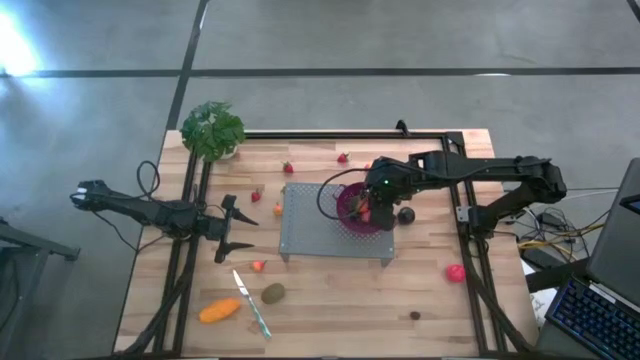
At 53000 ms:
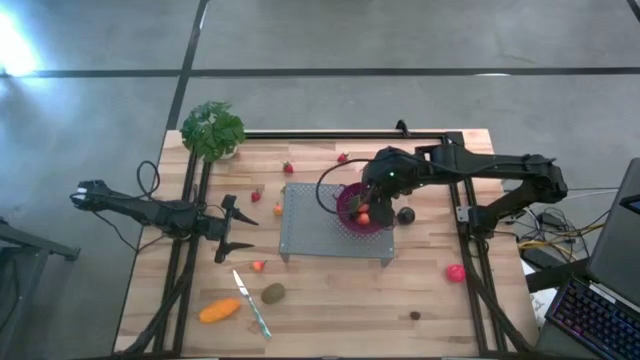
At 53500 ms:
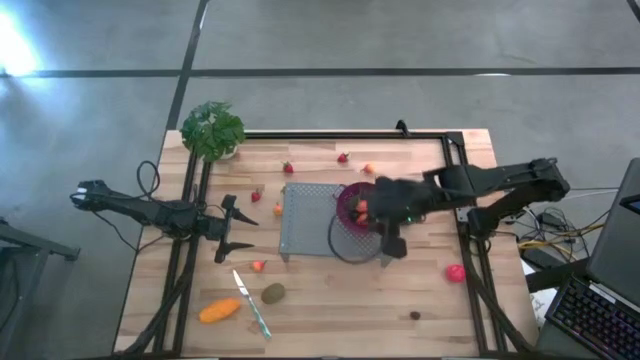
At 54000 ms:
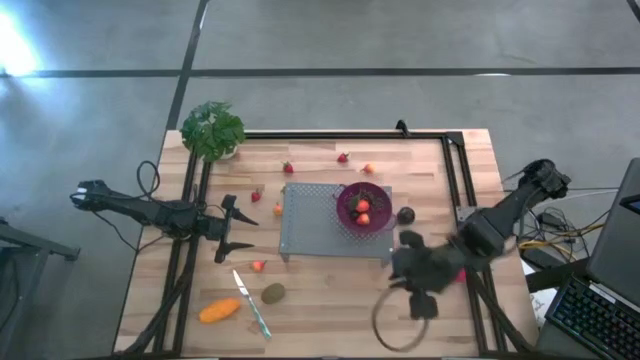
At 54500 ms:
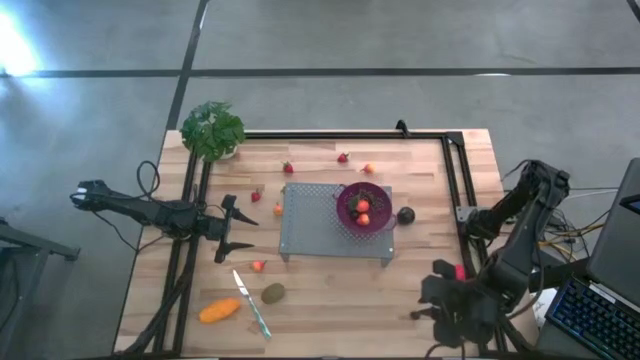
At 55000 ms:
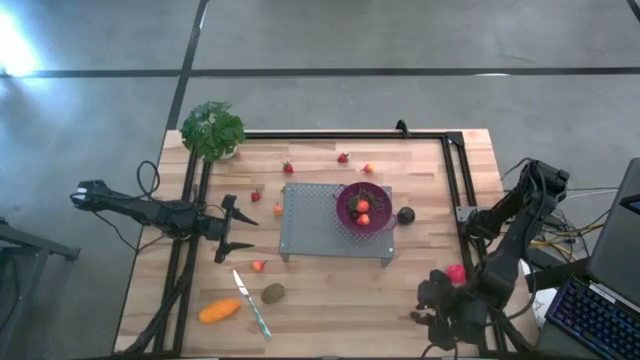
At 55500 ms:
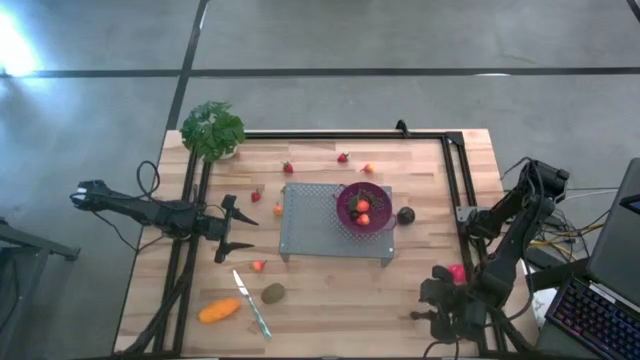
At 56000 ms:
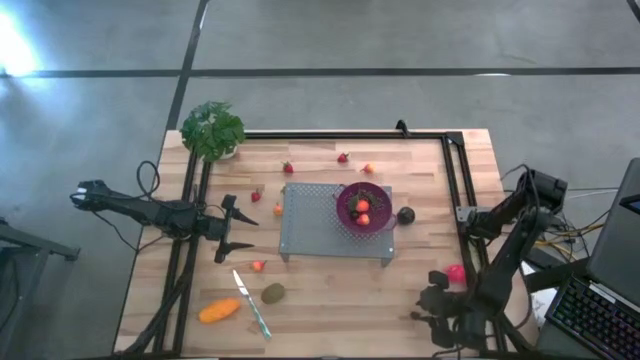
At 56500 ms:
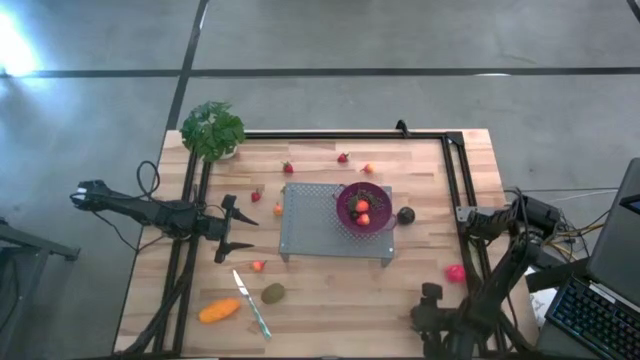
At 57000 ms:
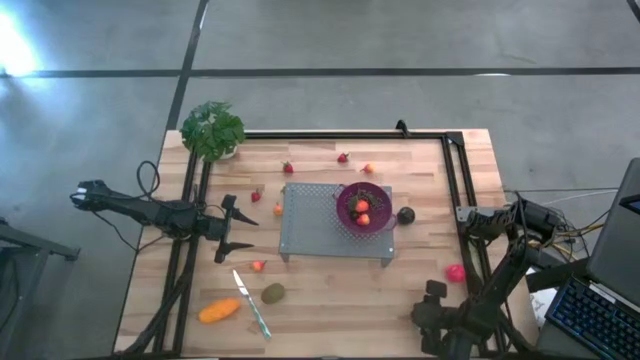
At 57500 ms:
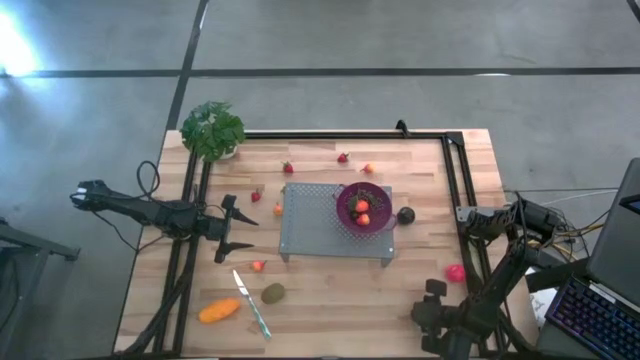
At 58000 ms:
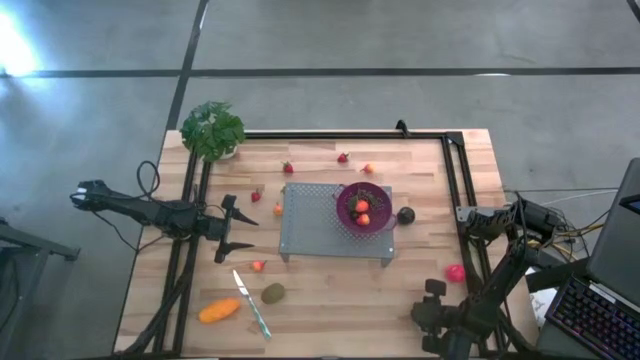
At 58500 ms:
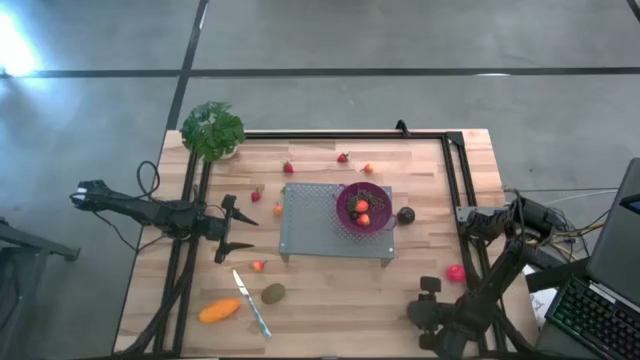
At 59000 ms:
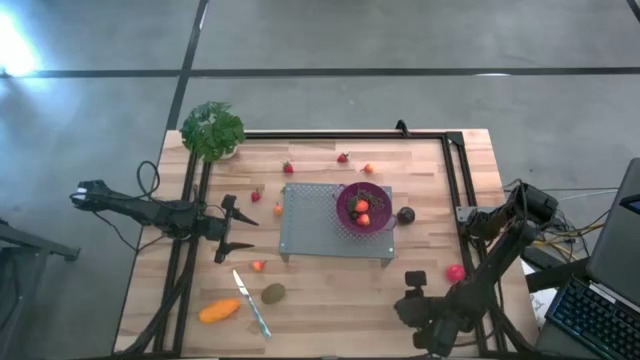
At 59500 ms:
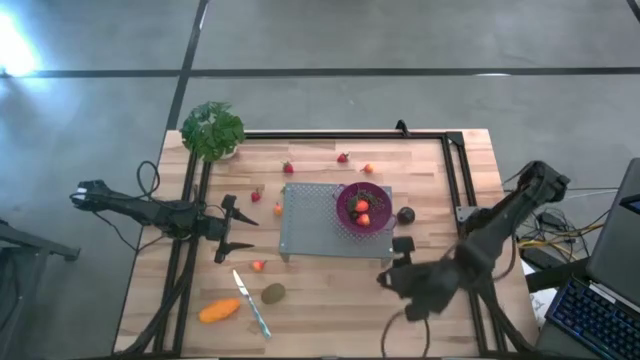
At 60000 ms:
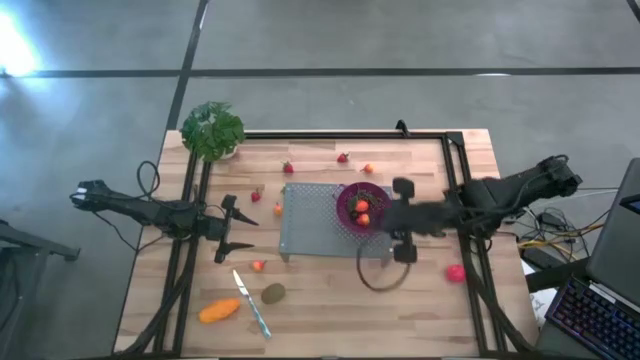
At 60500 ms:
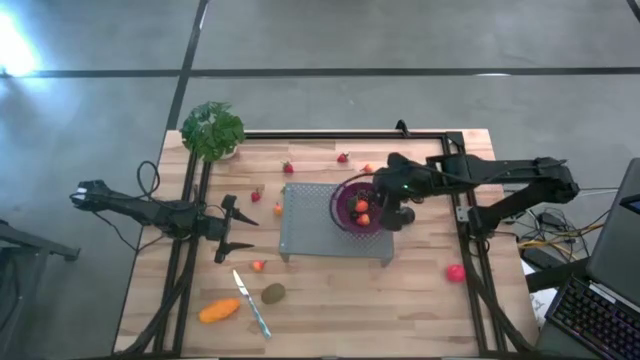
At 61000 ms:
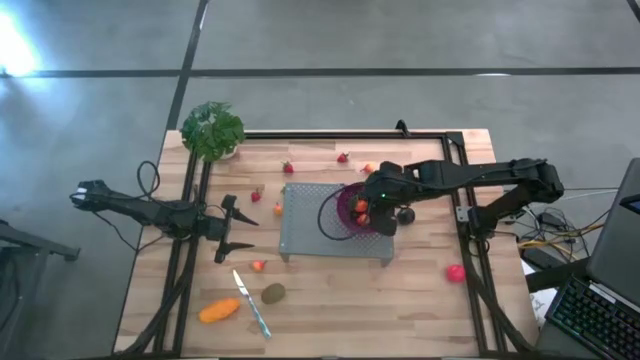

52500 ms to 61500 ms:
Task: Pick & Place Fruit
Put the blackberry in the purple strainer bowl on the shelf

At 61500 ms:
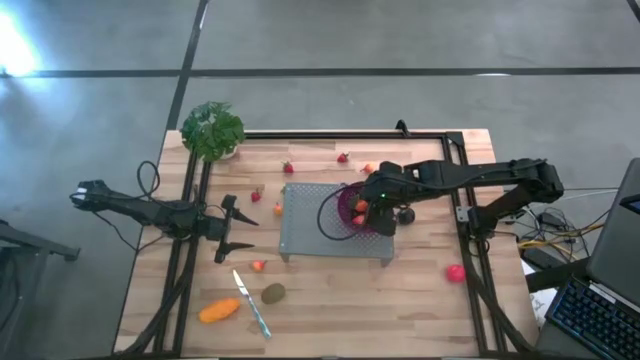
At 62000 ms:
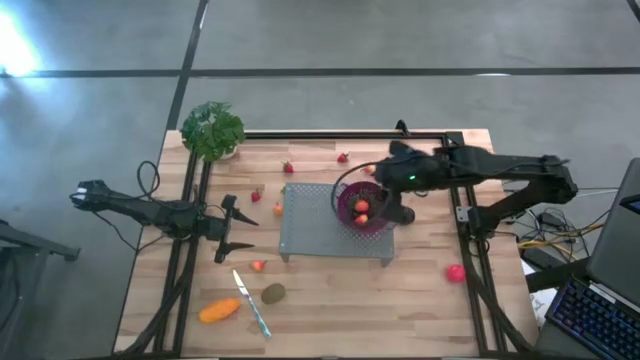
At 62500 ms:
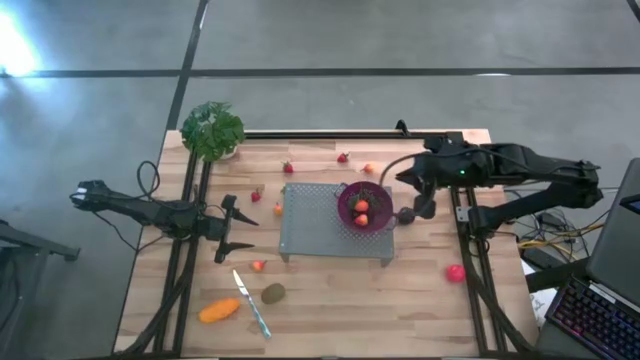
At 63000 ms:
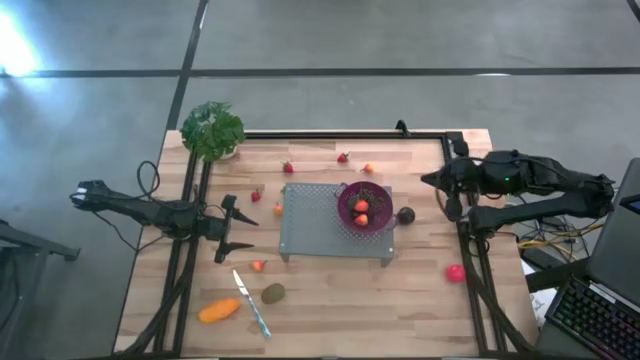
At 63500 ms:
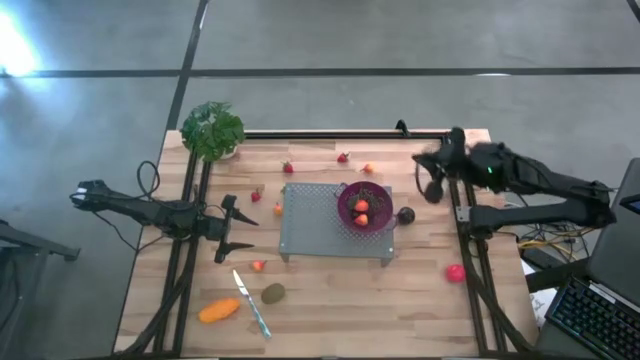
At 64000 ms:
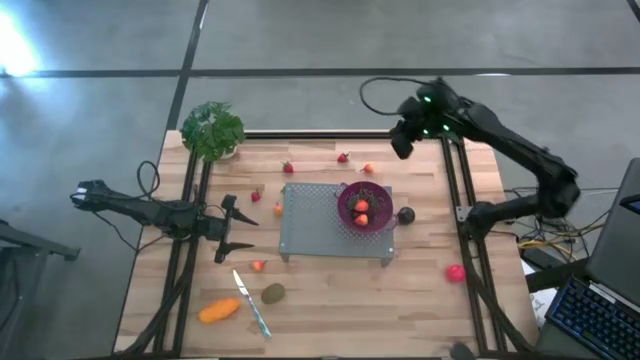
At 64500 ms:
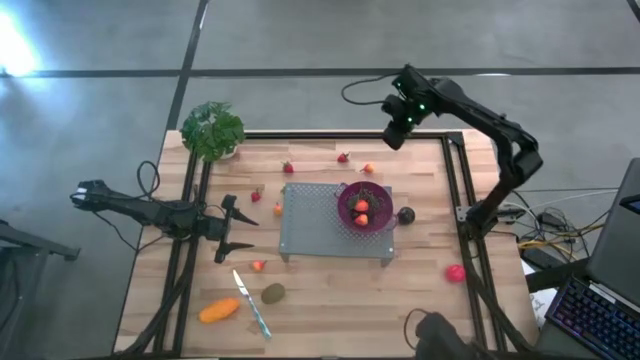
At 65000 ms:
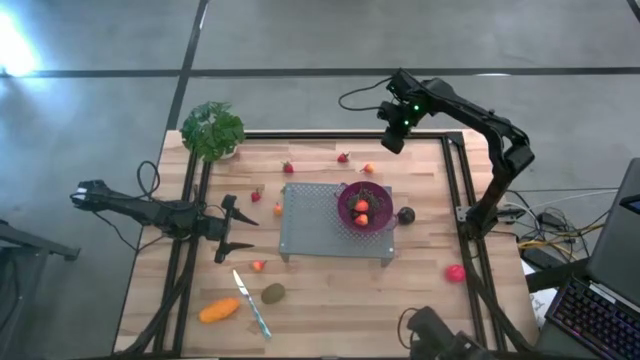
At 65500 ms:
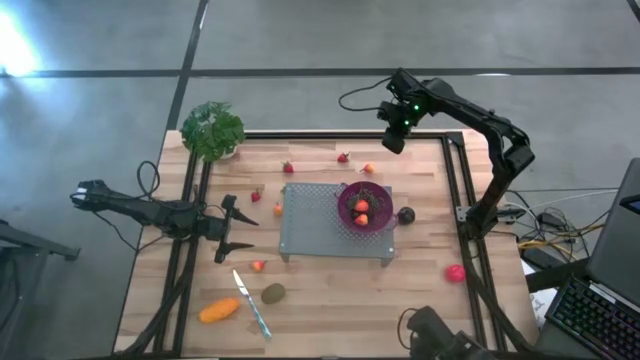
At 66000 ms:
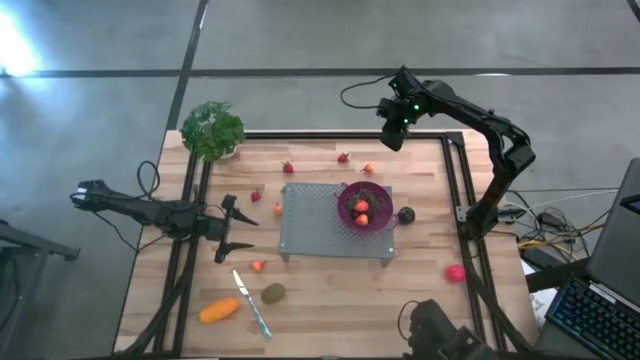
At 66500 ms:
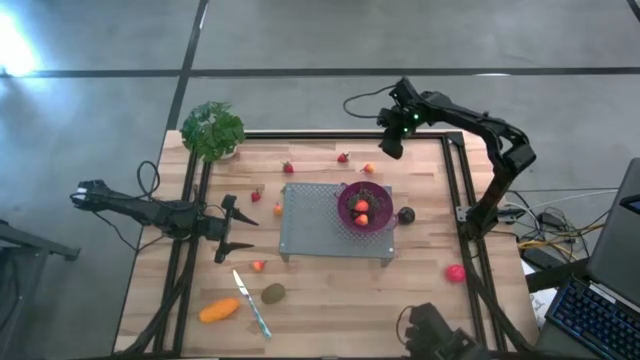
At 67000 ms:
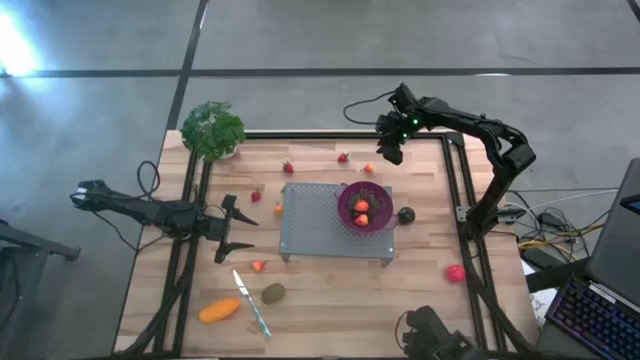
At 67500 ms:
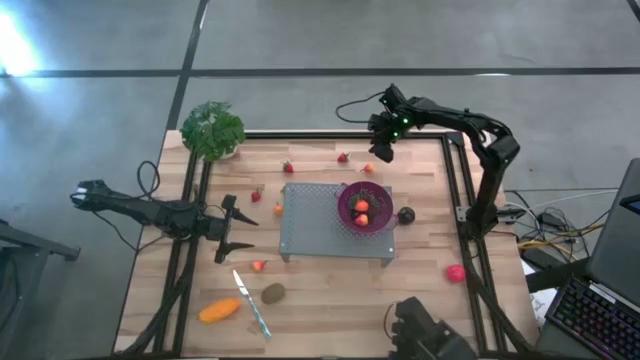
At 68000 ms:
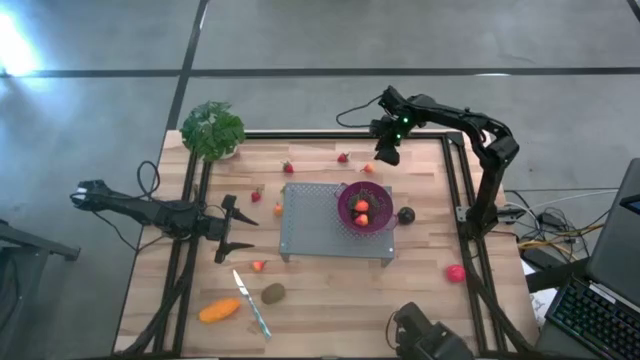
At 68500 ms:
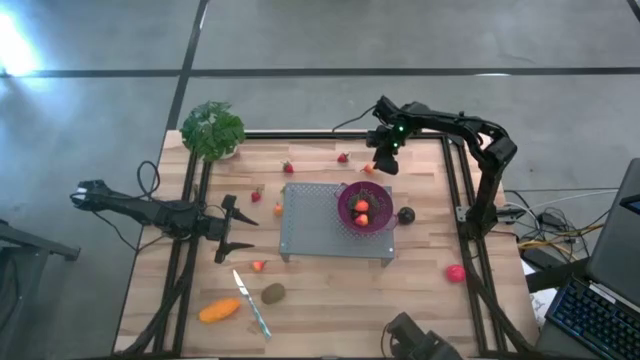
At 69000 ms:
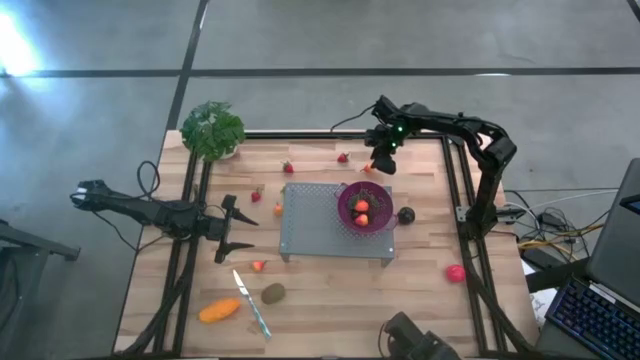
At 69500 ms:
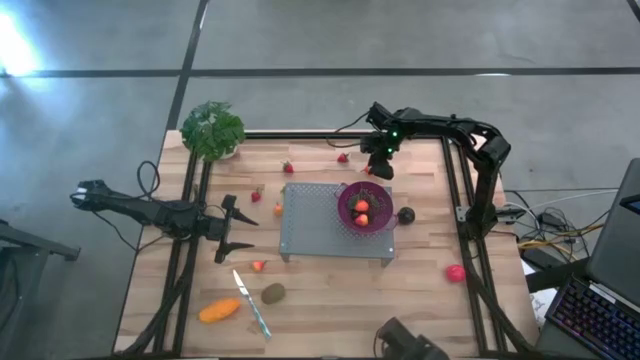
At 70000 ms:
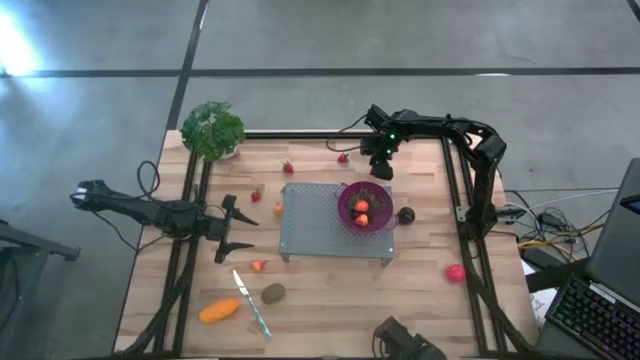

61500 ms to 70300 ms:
Put the pear in the purple strainer bowl on the shelf
